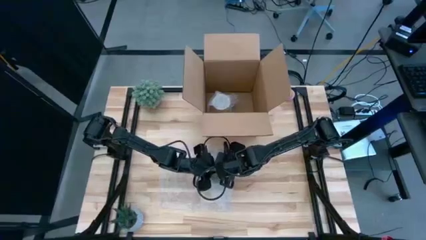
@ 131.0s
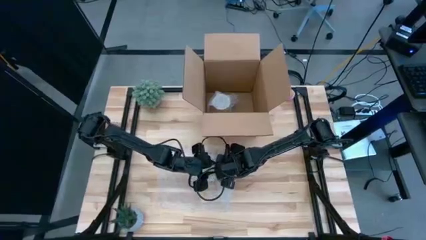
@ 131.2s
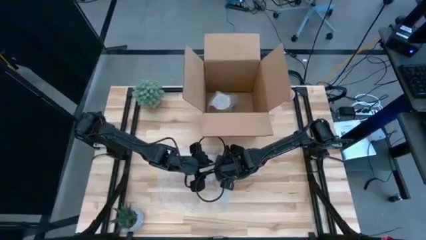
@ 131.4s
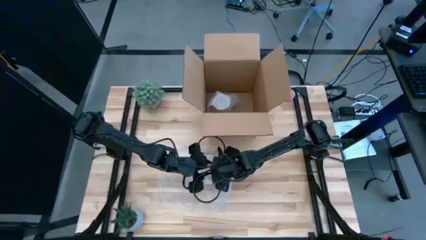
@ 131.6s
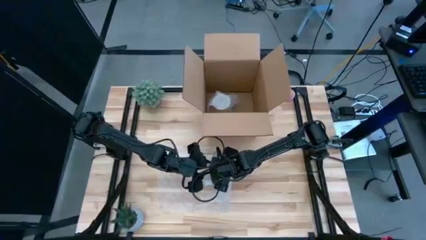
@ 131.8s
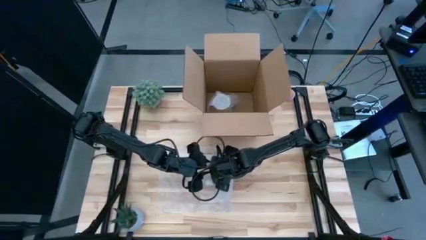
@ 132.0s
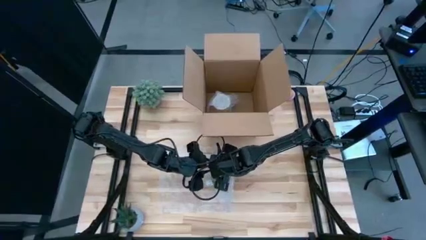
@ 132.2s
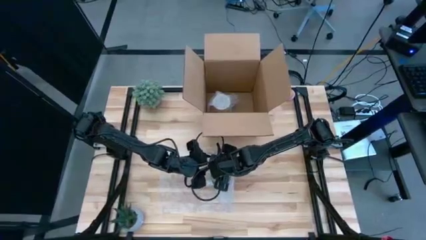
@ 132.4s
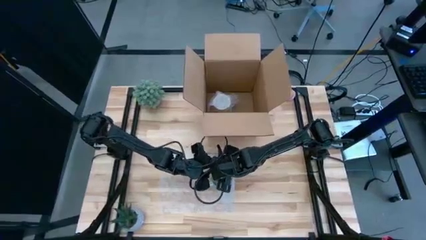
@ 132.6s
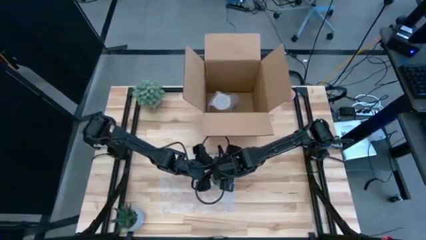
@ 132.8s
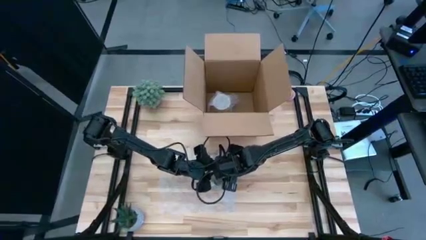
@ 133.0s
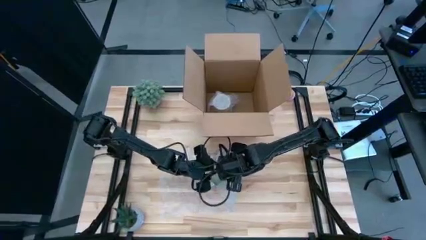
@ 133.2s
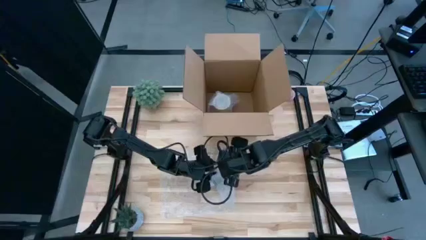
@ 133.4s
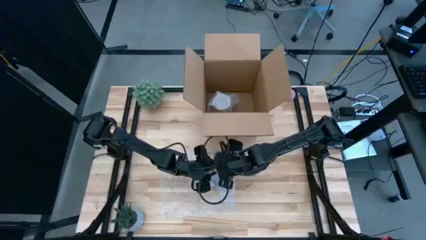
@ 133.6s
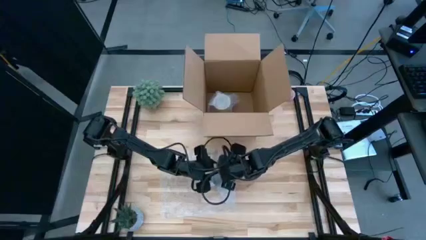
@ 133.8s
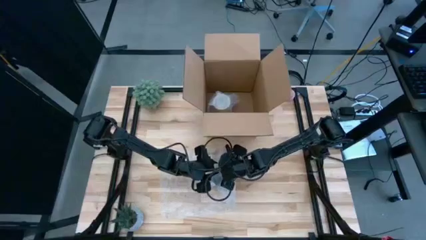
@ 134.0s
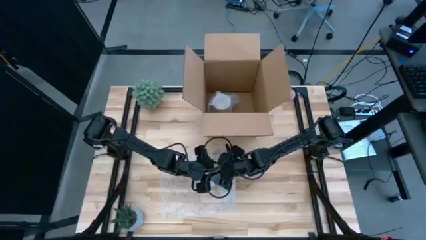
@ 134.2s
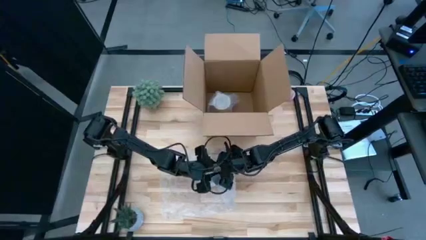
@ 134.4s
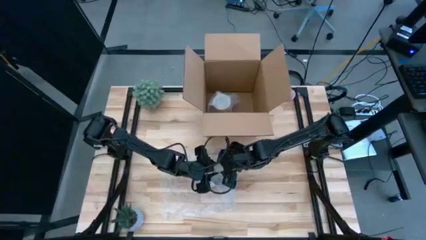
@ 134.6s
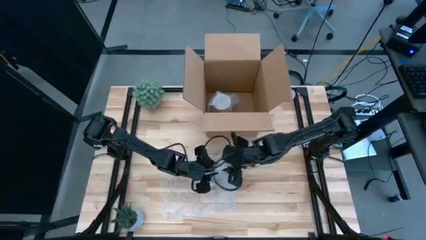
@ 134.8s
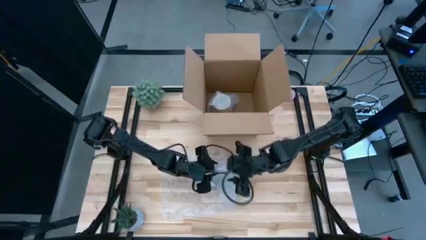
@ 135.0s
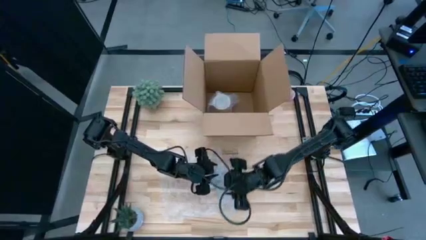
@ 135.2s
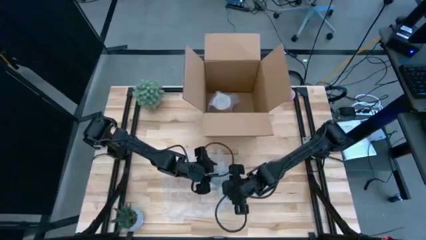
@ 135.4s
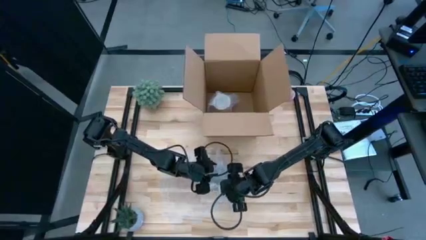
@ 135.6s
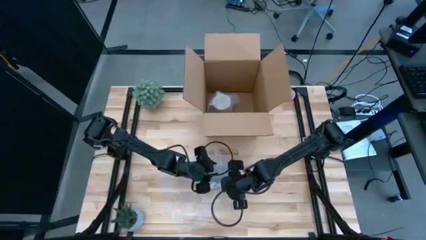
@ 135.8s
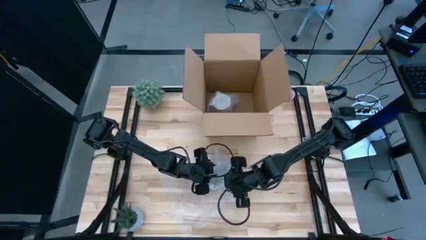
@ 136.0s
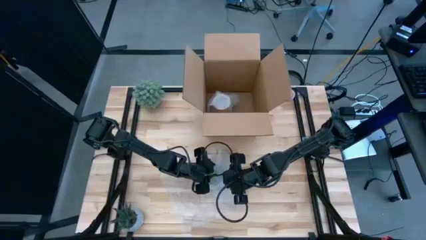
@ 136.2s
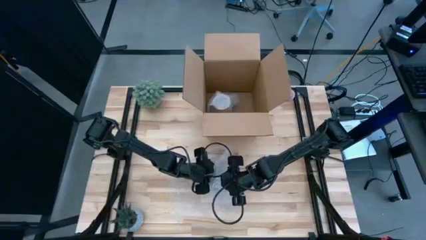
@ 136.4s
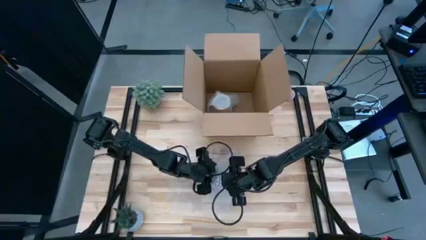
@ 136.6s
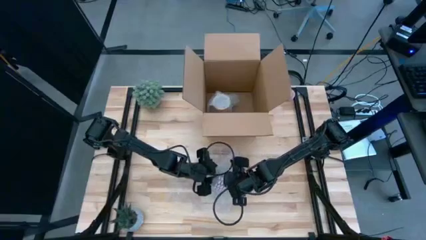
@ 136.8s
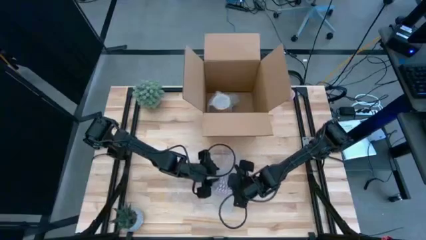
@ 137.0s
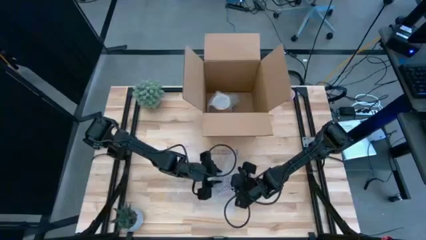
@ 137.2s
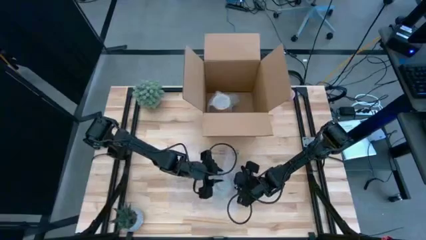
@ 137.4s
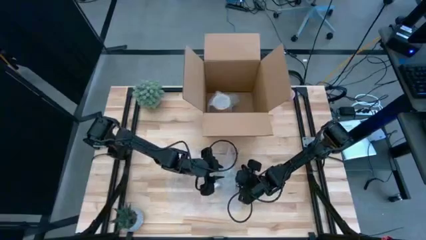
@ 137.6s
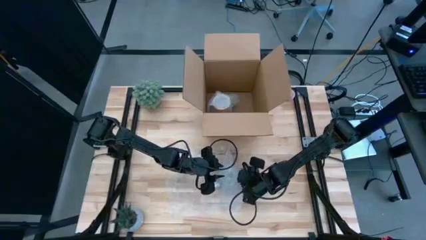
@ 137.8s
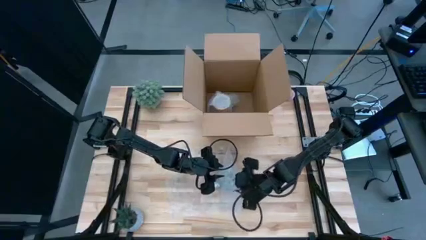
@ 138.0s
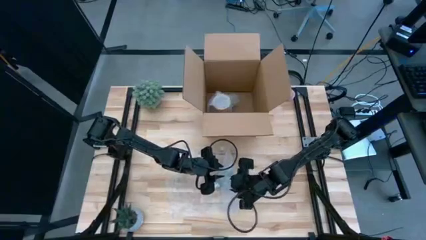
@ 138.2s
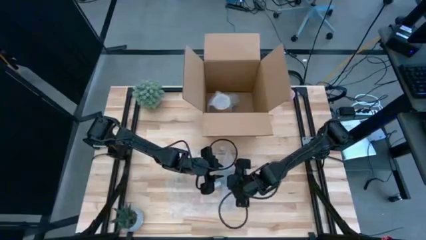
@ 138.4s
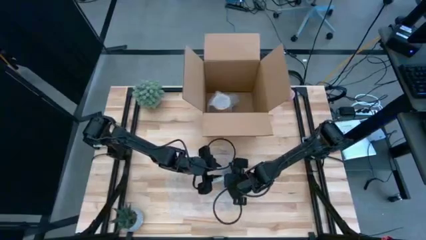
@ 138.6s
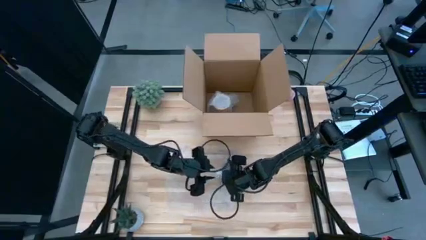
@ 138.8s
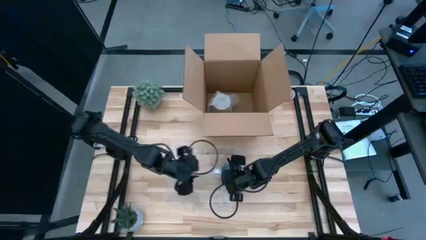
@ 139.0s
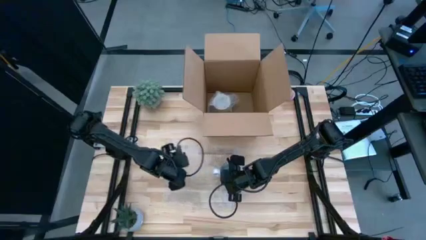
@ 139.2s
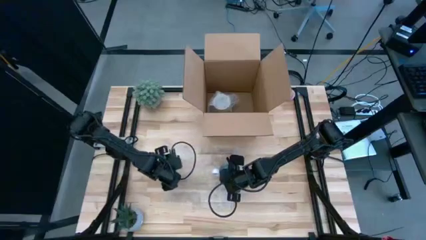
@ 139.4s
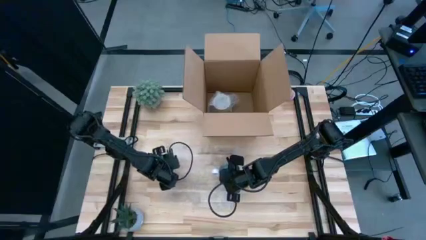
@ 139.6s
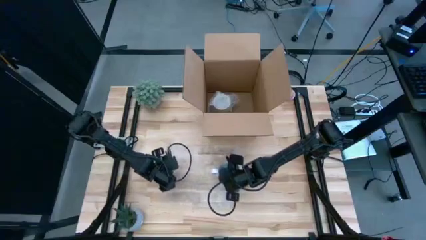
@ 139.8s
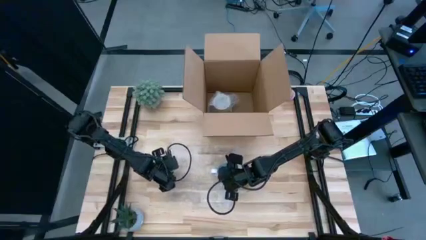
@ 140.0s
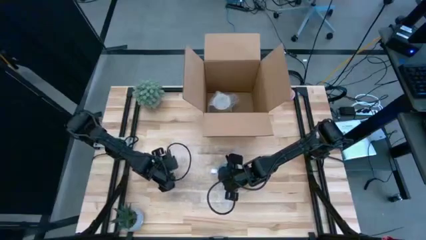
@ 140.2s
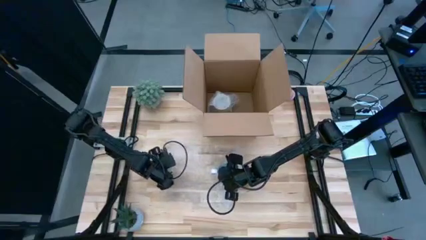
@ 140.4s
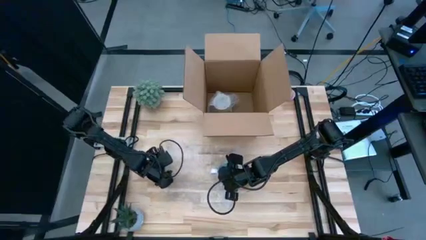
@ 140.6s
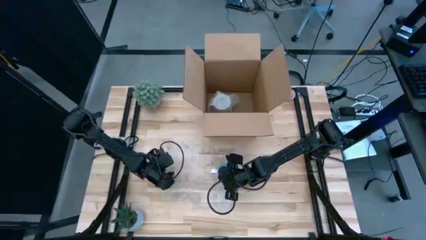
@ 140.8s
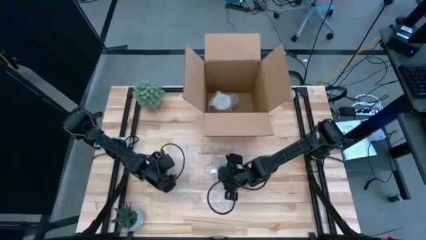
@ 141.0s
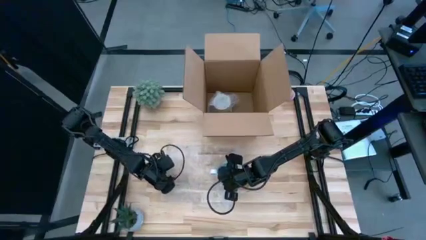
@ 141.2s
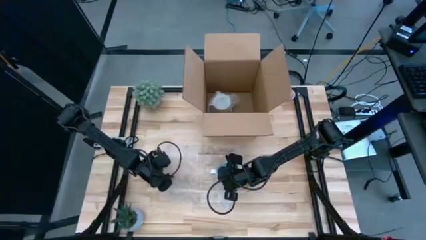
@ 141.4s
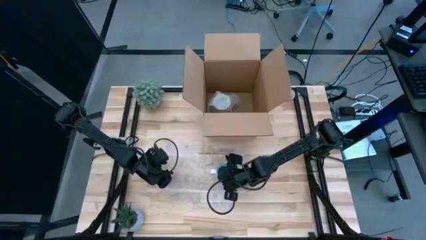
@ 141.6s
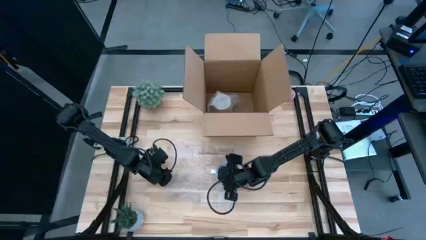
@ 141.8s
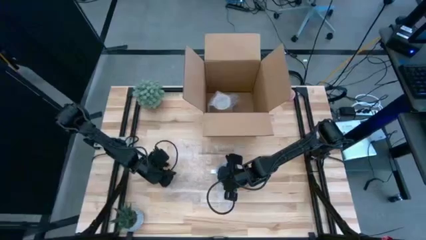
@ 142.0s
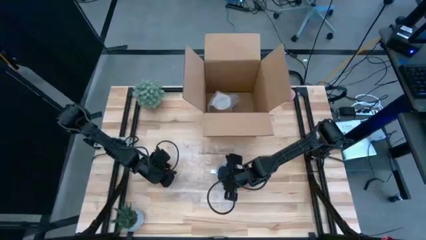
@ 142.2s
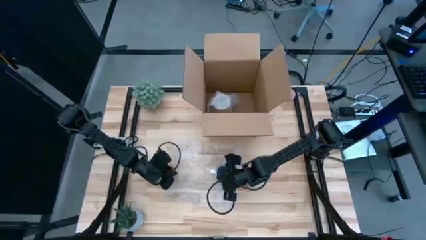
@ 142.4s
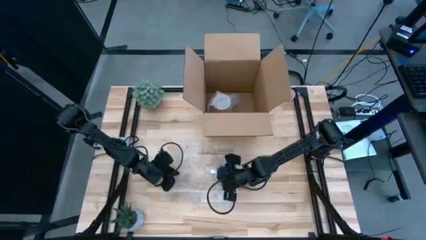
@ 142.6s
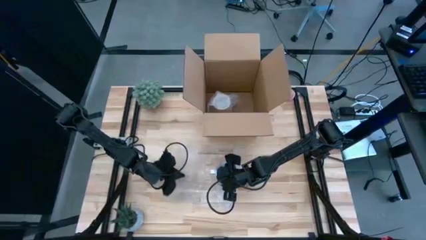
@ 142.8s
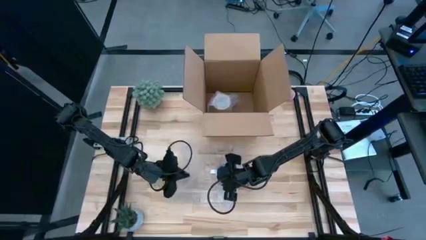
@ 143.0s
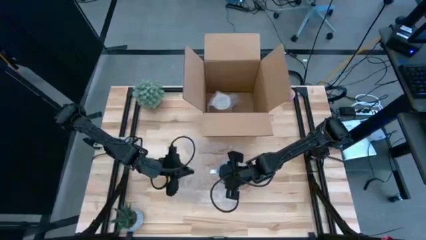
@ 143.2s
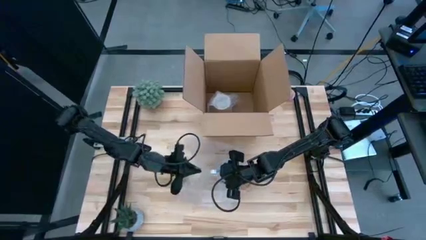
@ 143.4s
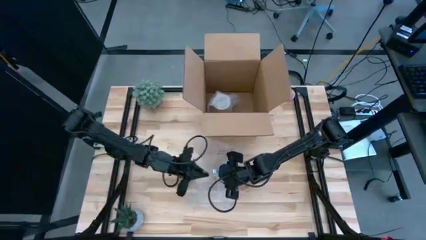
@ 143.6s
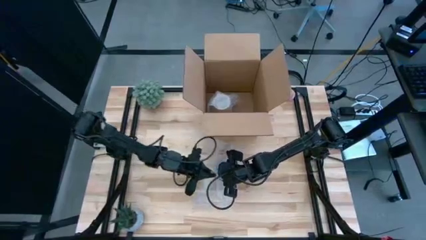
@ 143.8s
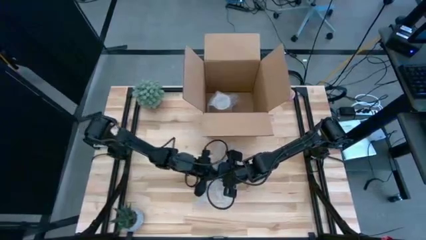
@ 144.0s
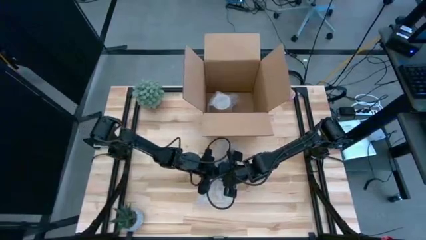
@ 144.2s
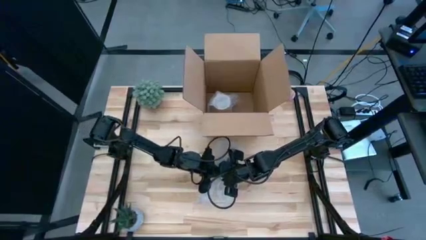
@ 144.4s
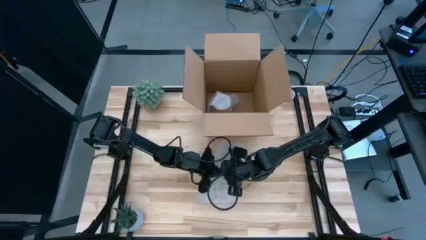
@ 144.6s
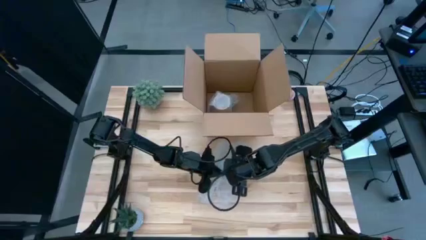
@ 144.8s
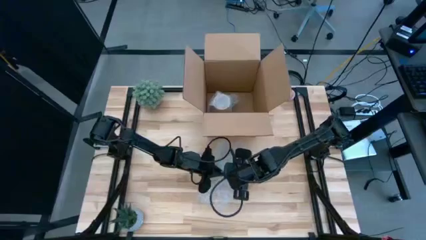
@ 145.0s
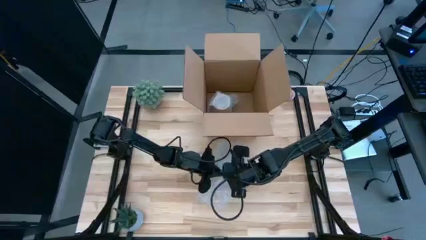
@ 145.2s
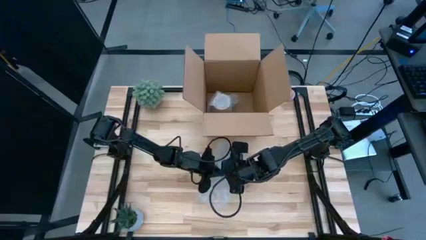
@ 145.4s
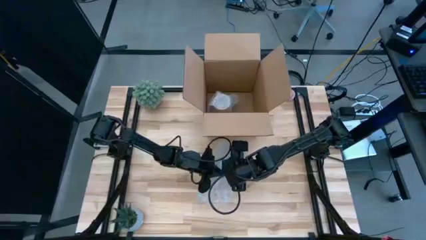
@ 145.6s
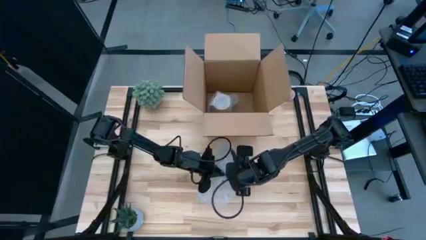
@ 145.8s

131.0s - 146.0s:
Task: wrap mug
Wrap the red mug with the bubble wrap
